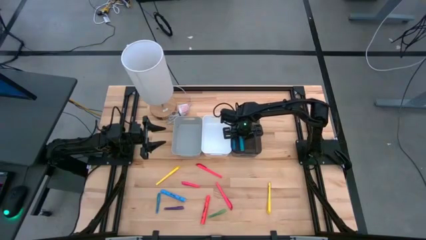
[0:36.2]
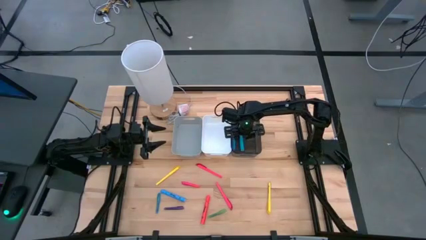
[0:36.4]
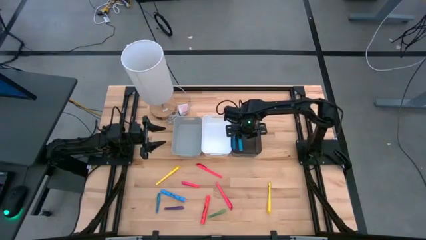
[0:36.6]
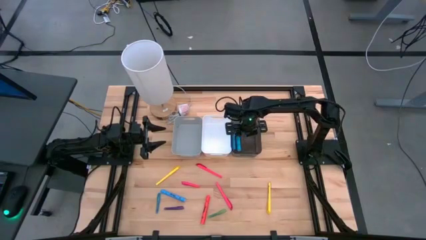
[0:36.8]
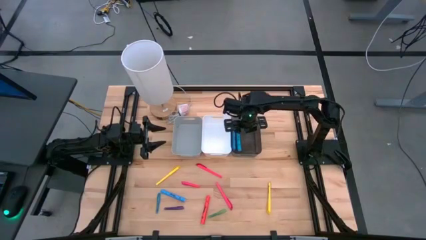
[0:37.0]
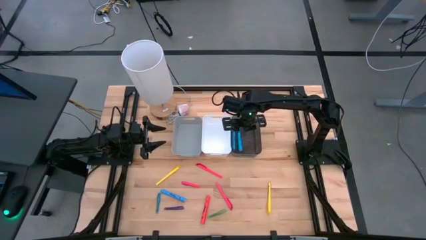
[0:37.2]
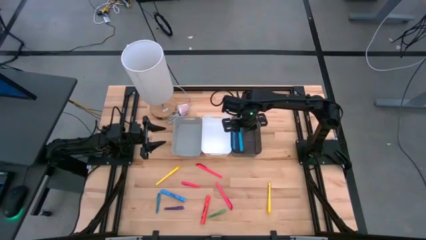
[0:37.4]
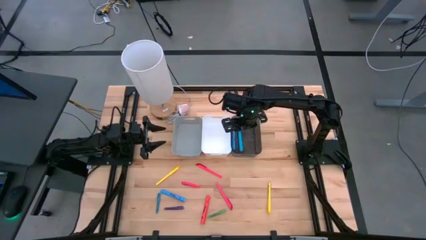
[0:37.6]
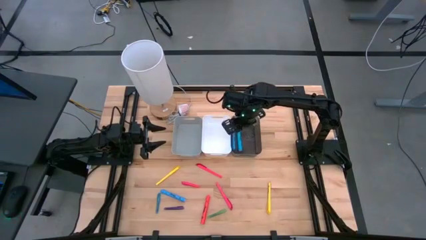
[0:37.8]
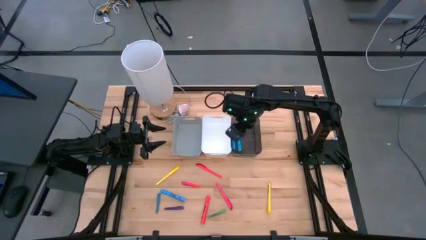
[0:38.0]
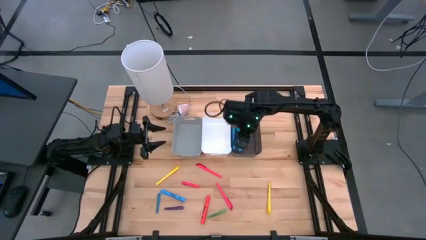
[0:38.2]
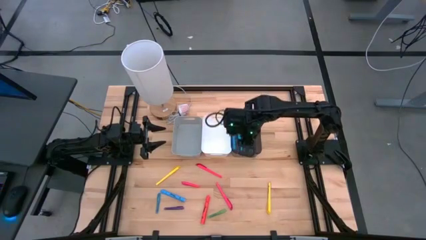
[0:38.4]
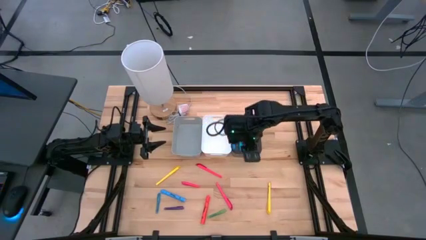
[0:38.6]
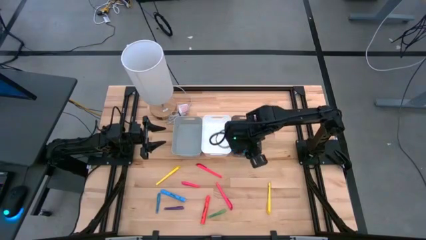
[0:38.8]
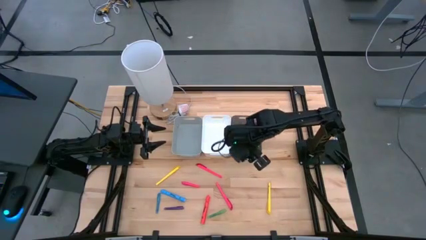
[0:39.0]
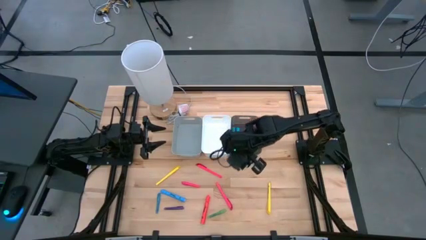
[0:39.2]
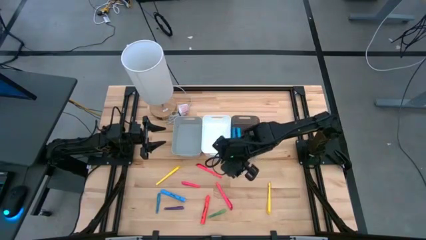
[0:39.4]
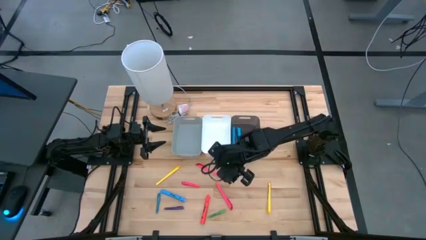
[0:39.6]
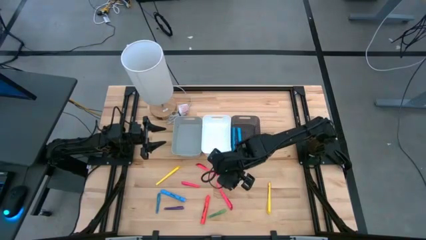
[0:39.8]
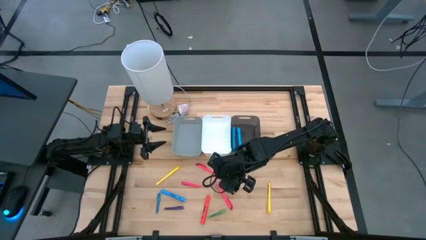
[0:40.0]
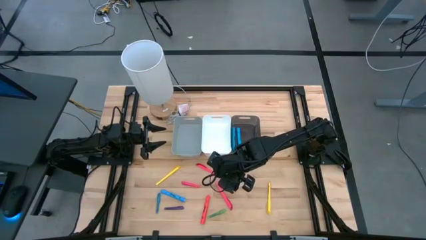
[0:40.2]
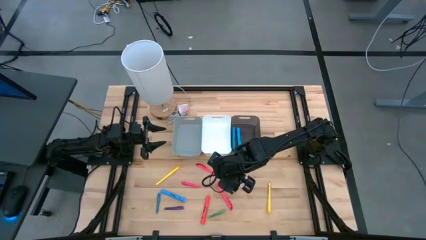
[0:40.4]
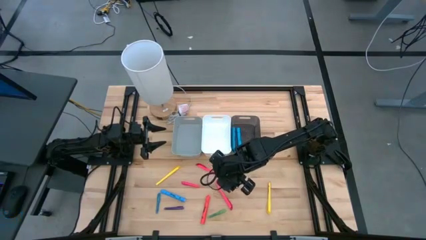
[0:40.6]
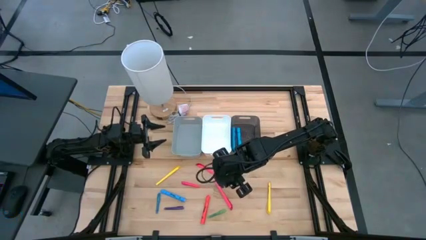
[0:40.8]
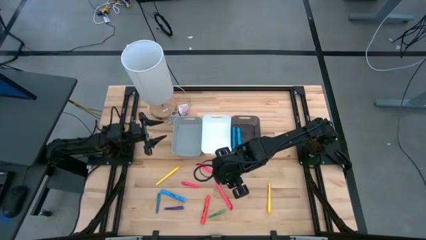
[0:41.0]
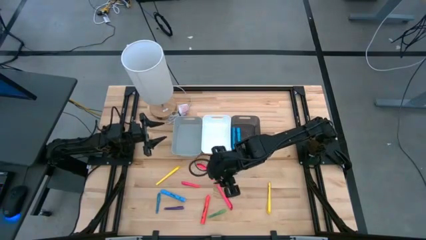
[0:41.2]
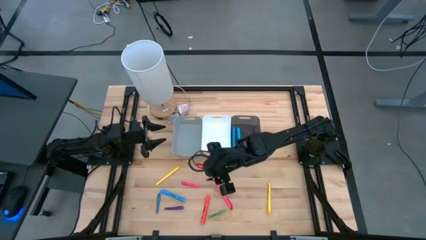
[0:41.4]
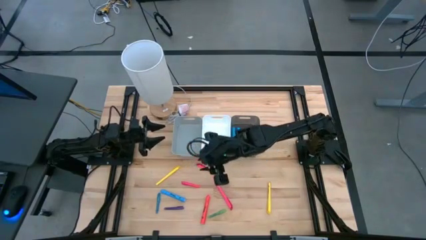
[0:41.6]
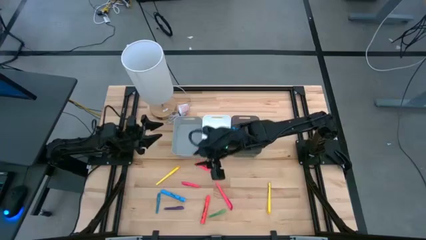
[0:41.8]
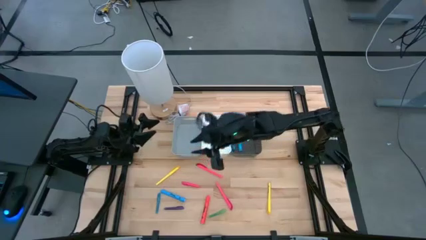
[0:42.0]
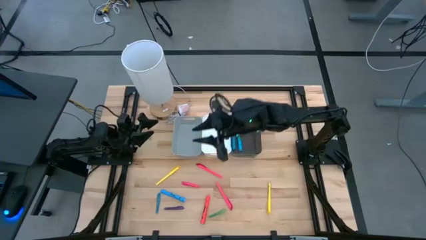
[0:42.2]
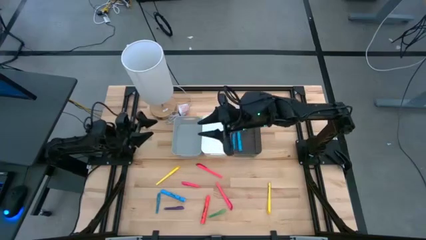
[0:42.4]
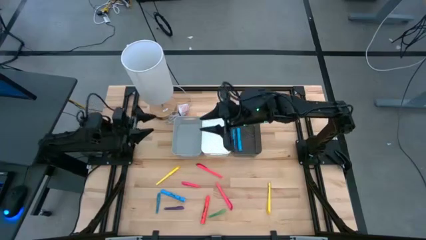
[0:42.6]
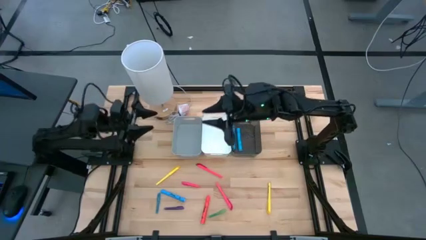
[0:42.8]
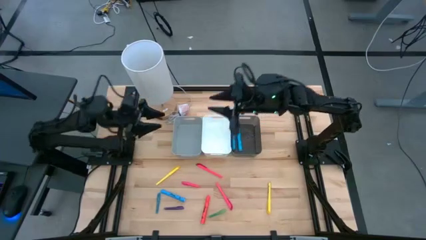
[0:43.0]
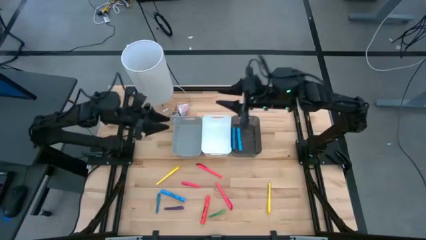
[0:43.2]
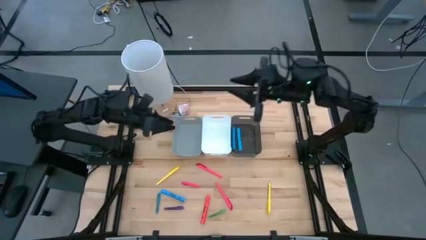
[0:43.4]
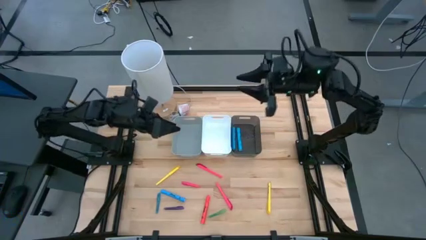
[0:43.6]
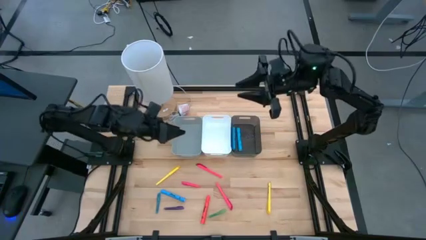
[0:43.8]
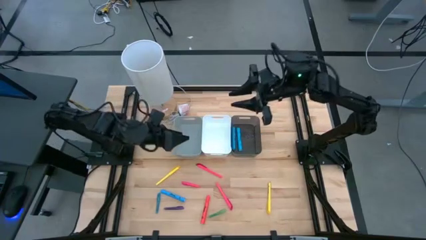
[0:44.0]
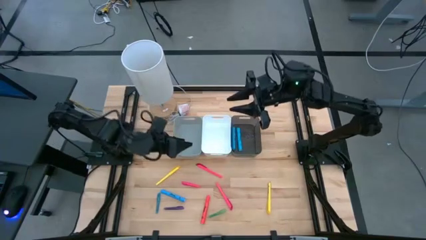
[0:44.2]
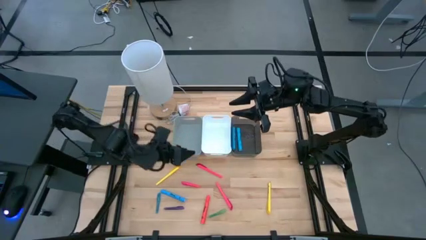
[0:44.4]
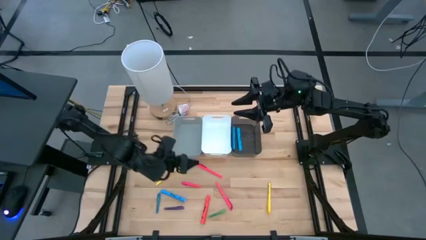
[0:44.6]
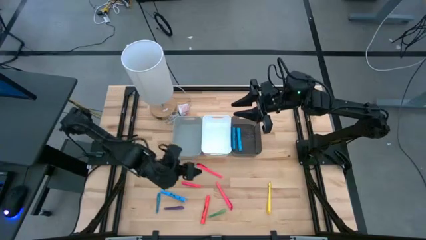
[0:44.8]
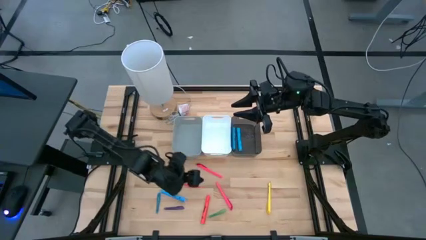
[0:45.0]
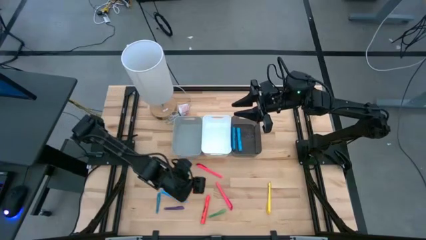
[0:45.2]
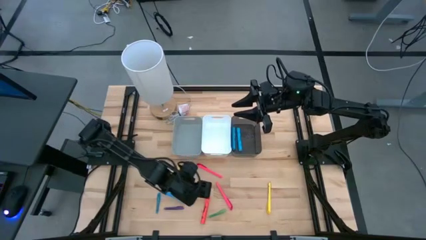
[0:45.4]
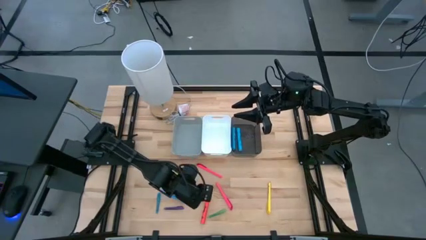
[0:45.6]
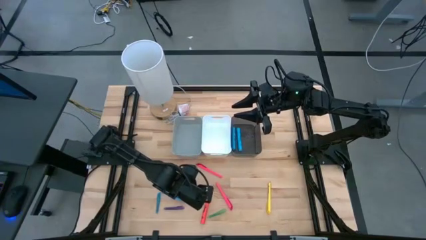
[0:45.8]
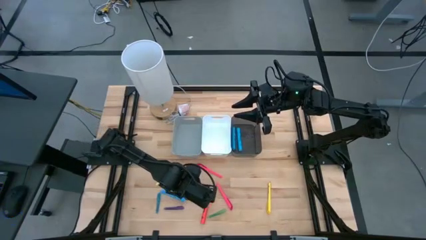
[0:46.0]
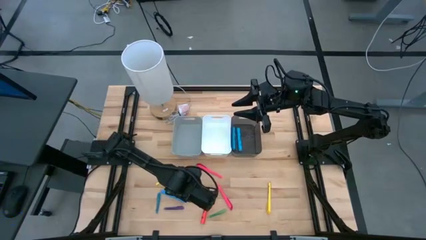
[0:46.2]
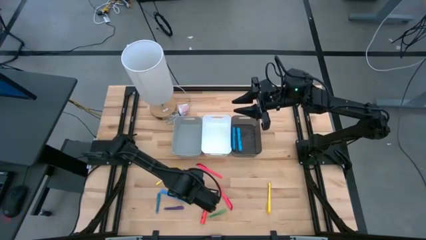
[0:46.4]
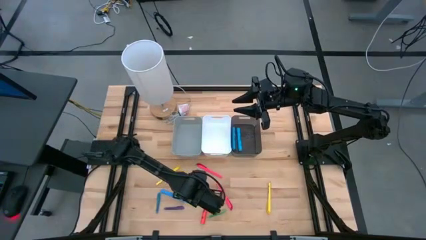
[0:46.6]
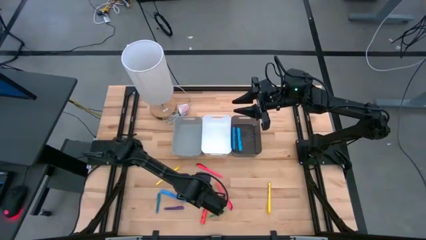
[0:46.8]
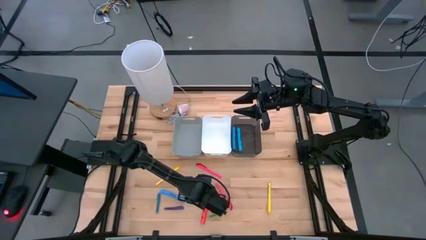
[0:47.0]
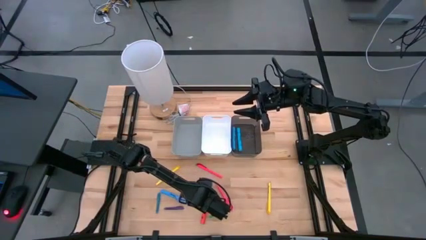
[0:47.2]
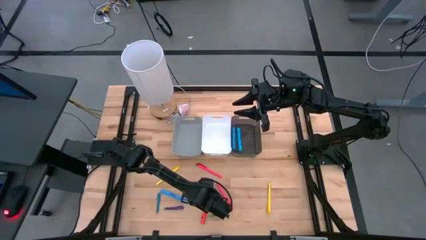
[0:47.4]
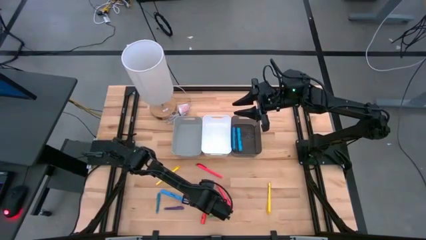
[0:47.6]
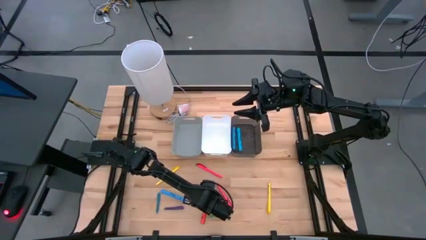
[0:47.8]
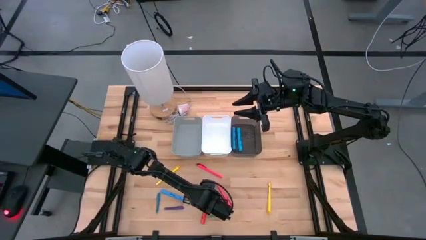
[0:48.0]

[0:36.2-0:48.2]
Task: Pick & Place Markers
Put the orange marker pen into the black bin

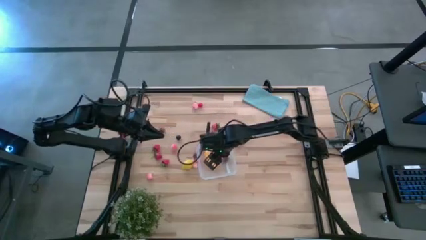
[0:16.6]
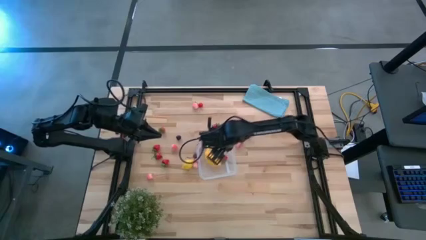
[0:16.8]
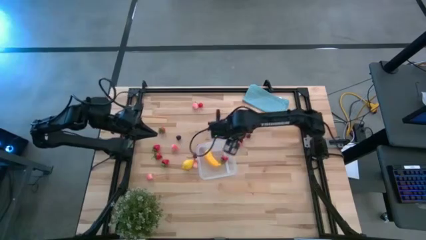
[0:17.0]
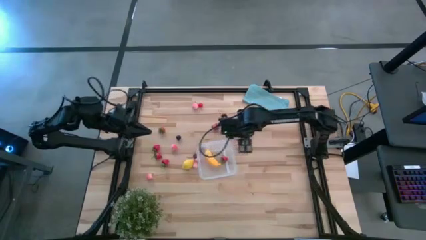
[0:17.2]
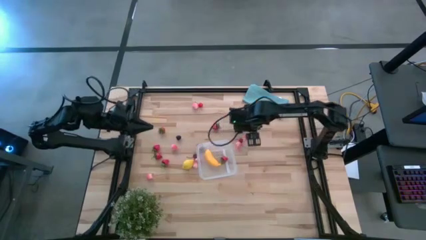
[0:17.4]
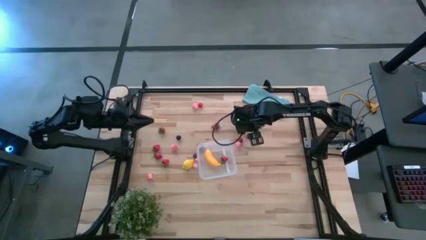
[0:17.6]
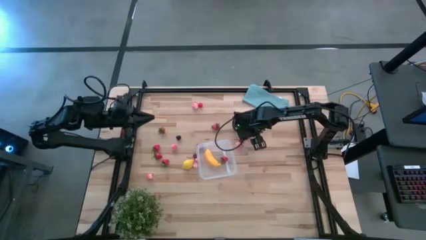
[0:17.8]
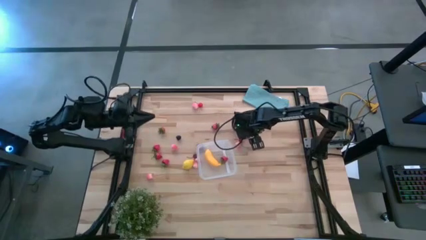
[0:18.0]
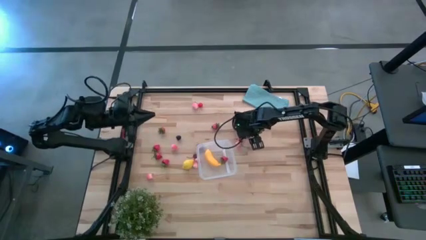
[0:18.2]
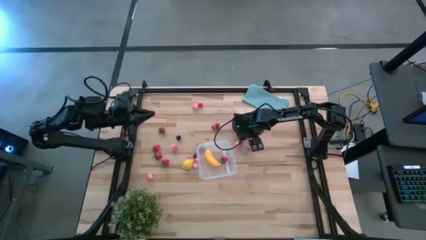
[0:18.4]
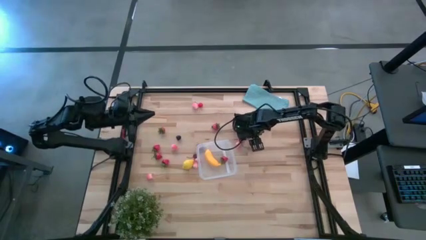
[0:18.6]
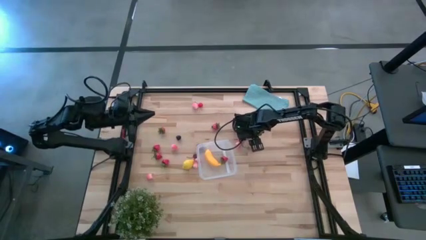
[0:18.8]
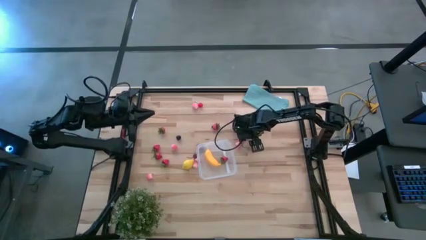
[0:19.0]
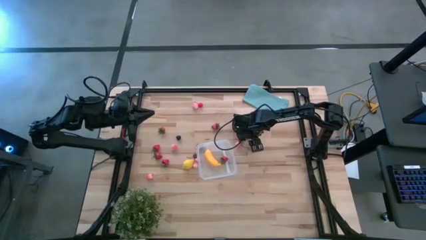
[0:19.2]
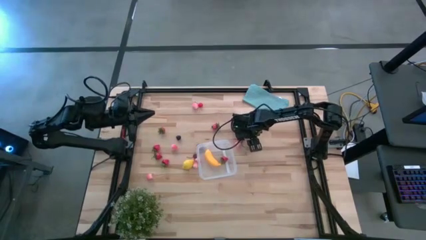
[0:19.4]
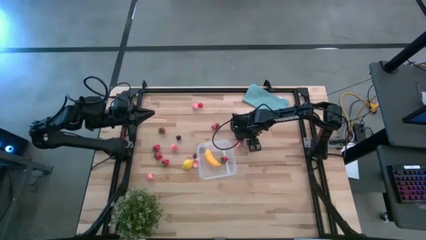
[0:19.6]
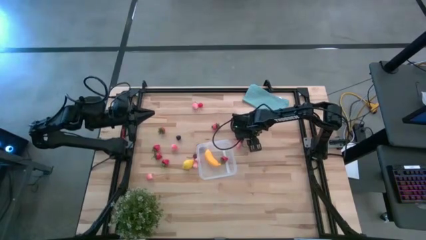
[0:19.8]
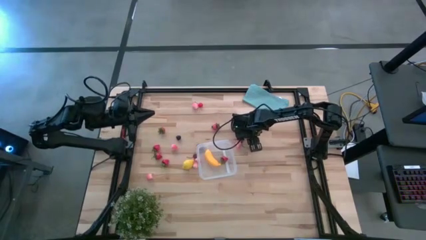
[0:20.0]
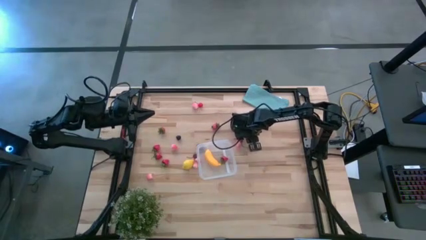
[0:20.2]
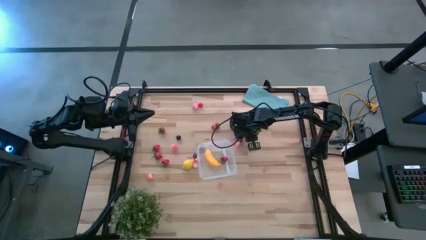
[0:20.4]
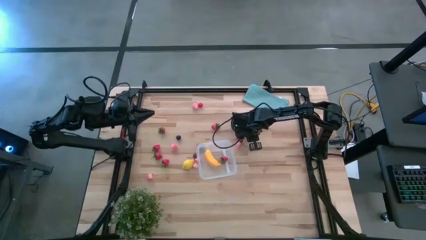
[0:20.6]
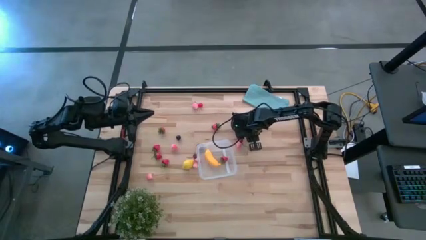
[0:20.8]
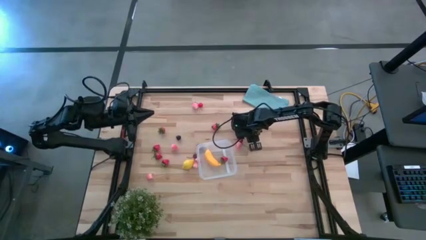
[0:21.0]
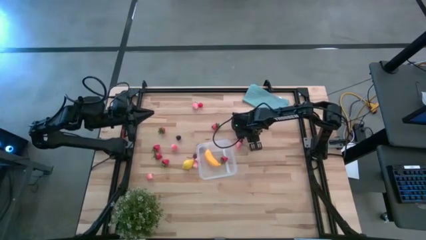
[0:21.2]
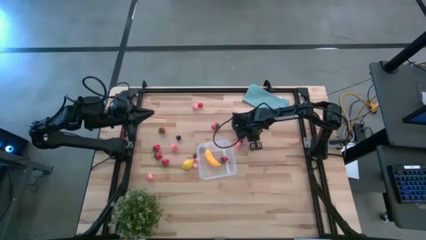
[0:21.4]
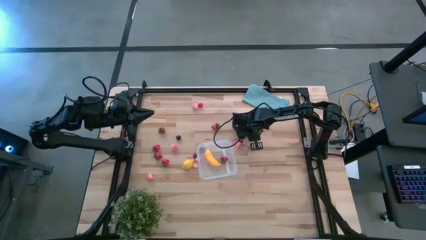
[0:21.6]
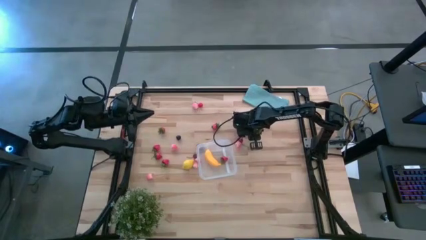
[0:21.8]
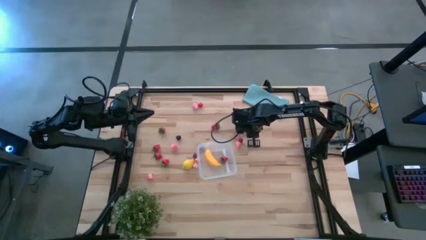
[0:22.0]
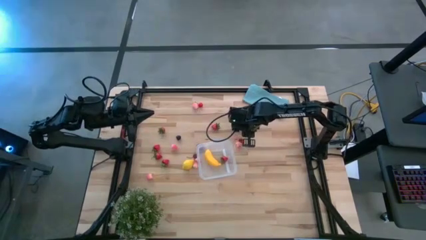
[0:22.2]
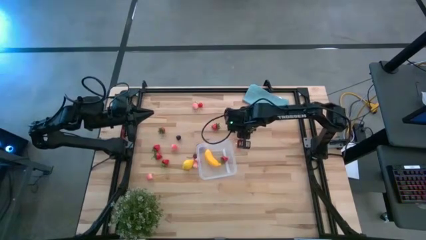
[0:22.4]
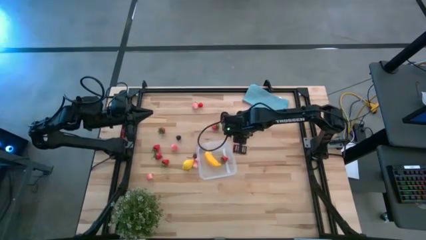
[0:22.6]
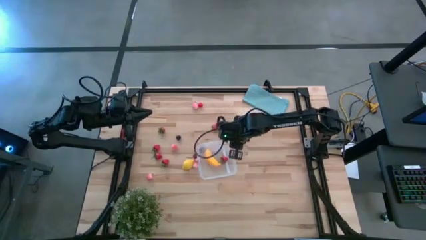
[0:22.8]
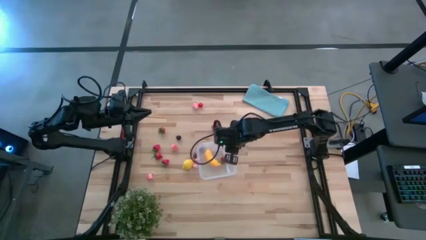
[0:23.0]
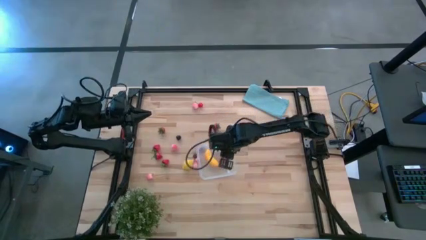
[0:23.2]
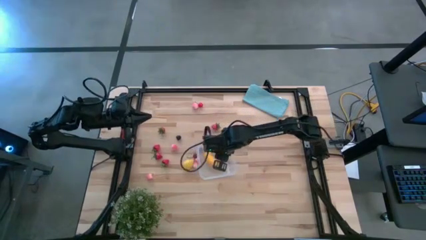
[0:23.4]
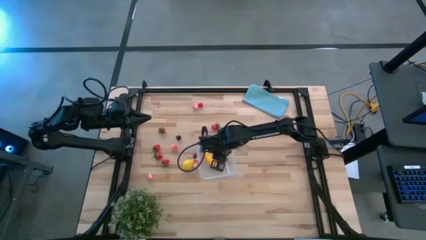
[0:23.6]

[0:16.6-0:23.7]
Task: Pick and placing Produce into tupperware
Put the red cherry into the transparent bin
